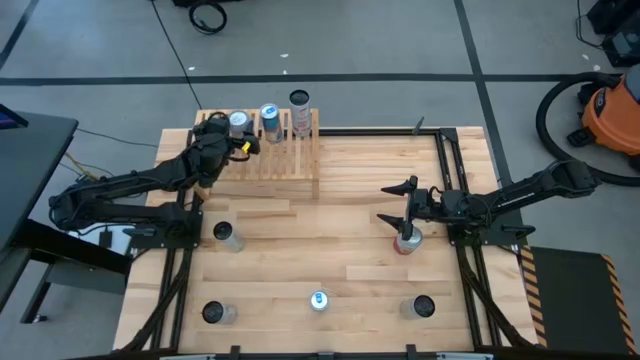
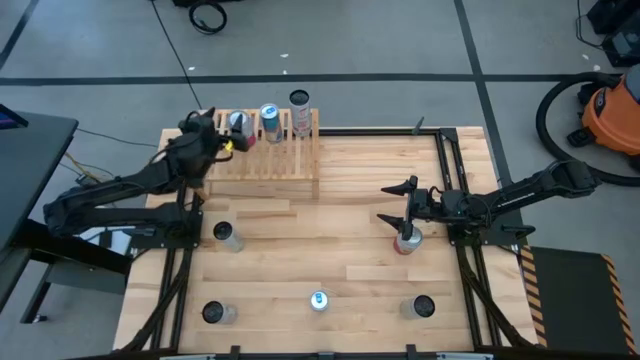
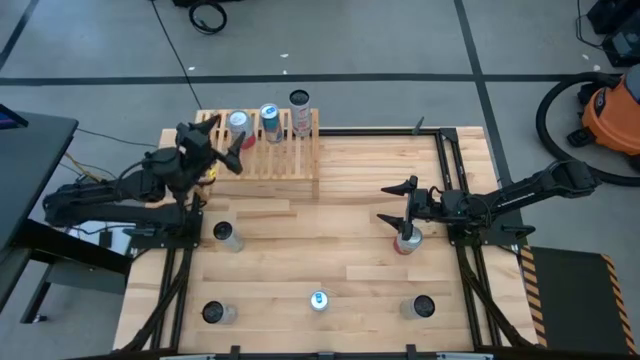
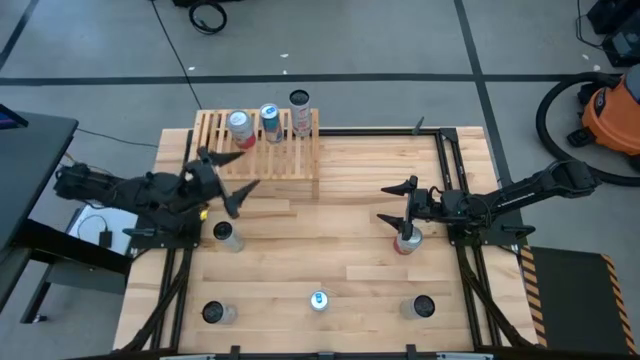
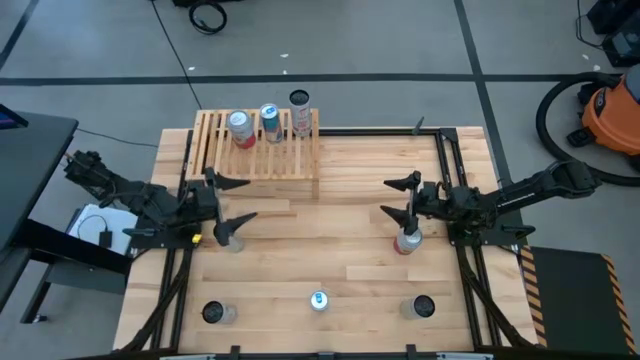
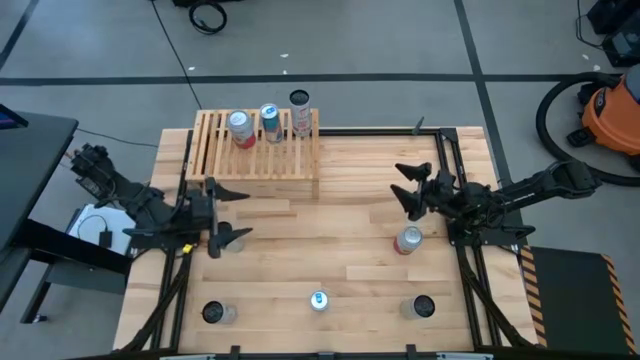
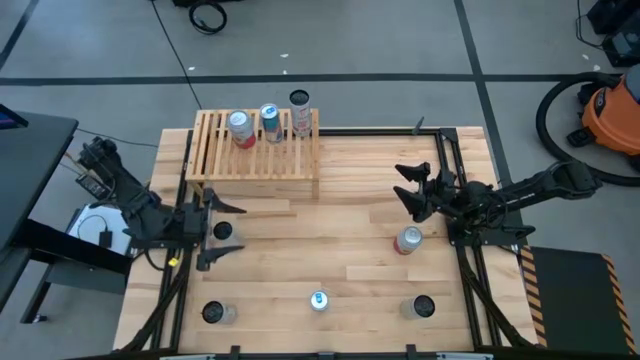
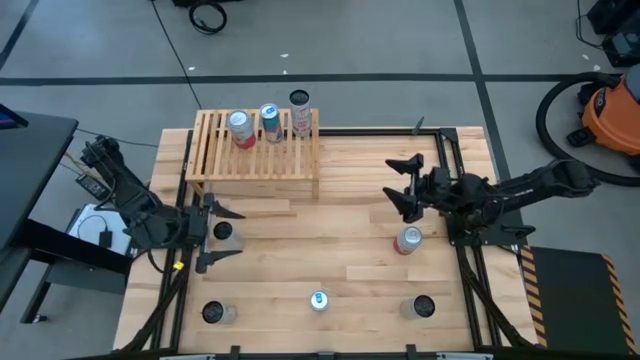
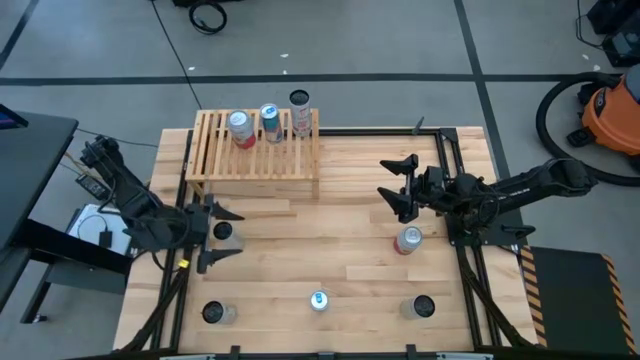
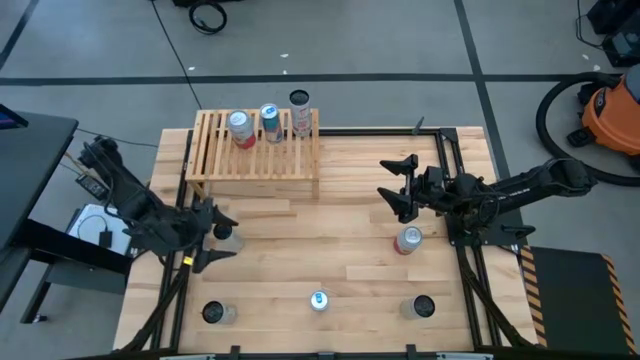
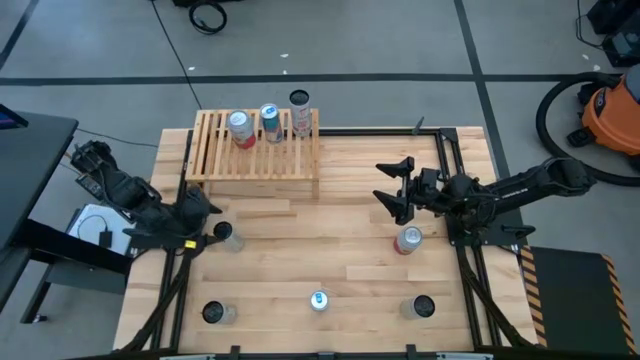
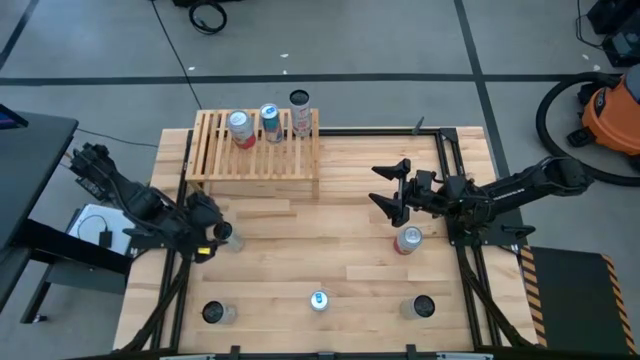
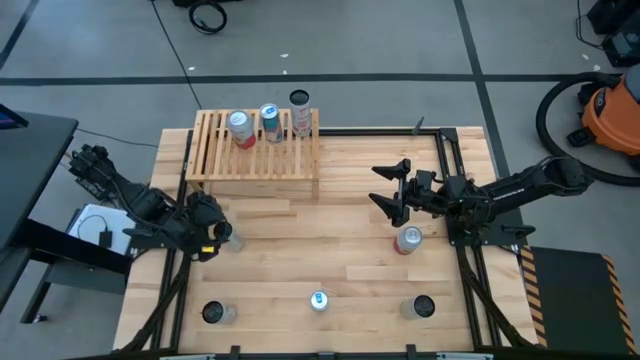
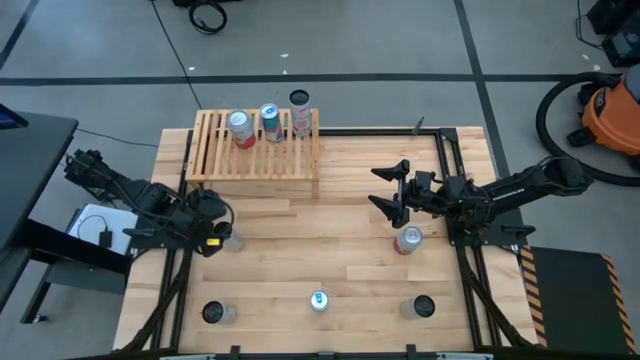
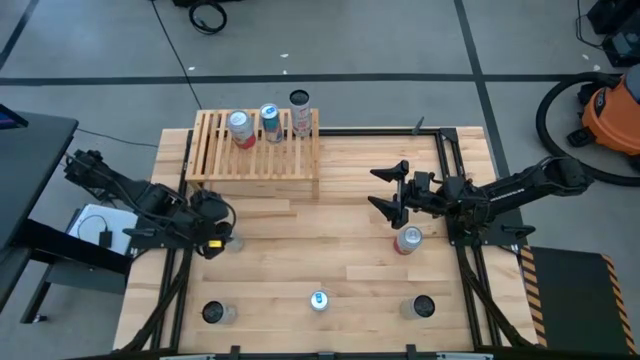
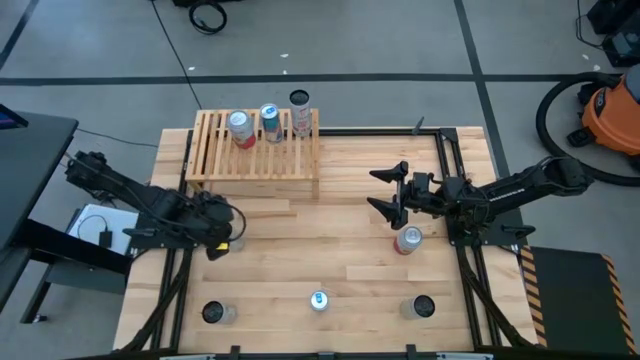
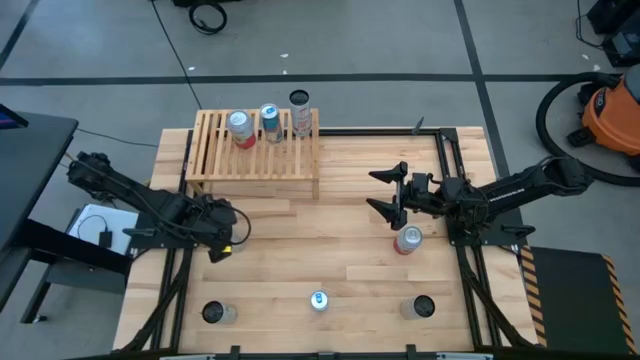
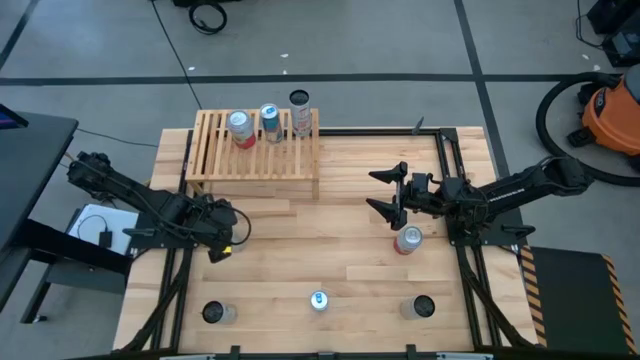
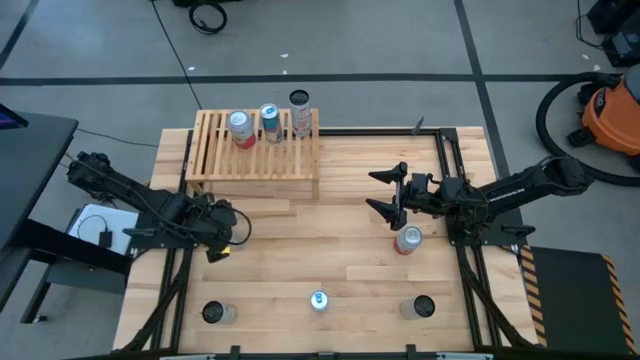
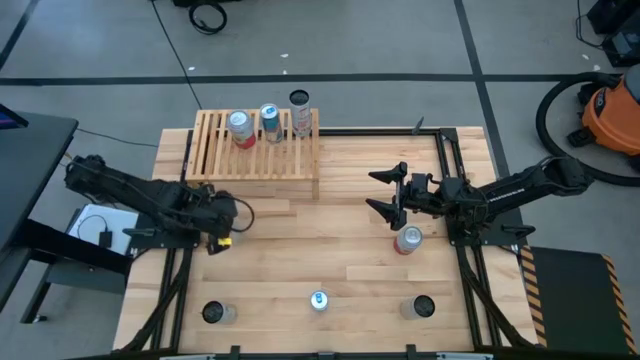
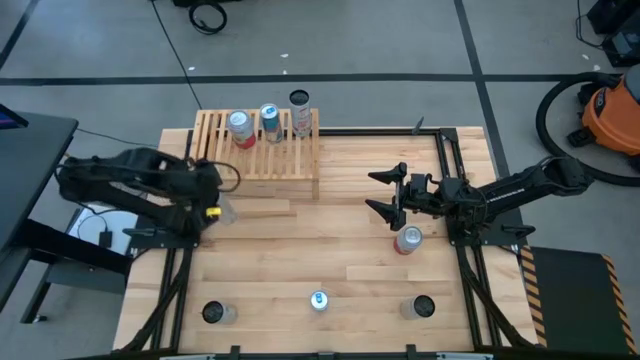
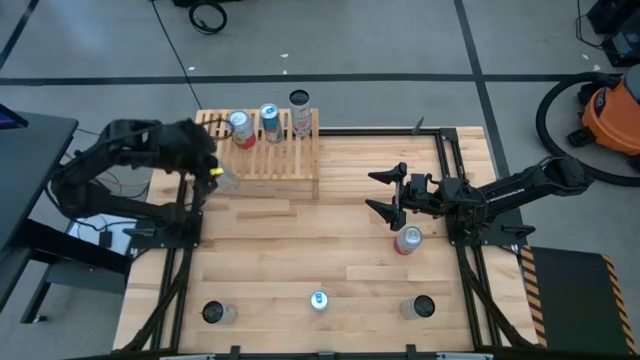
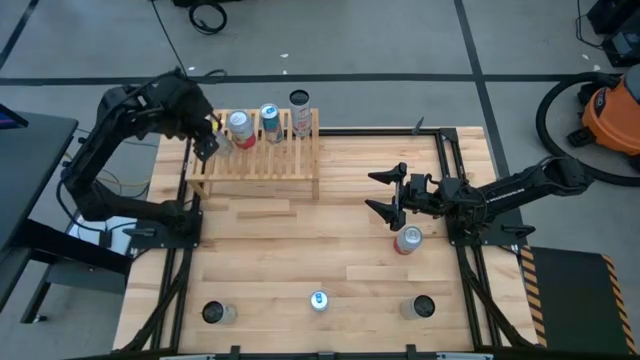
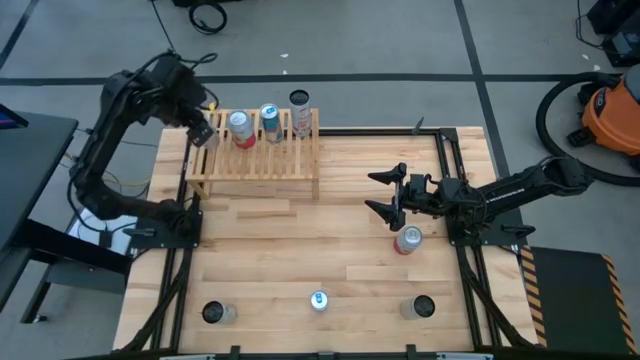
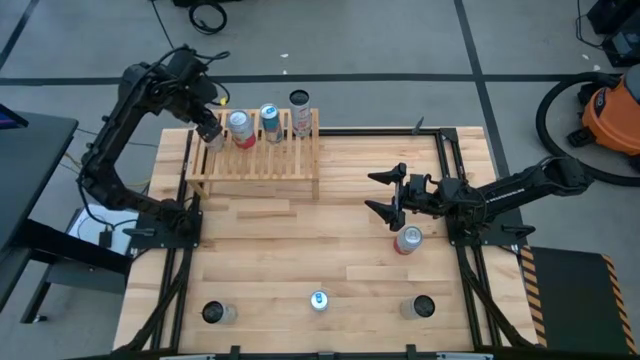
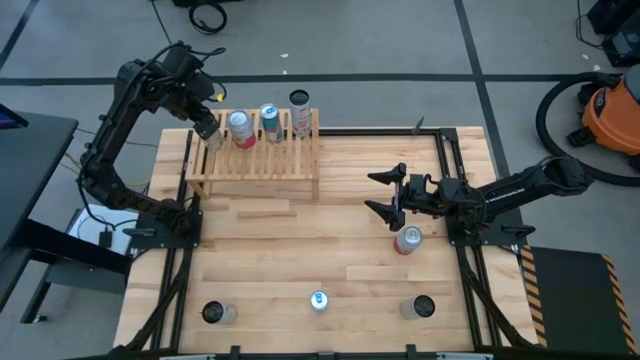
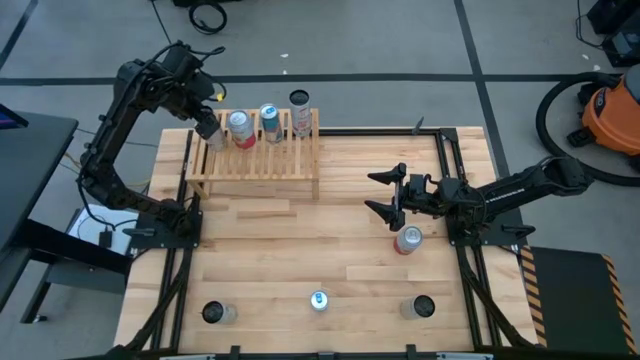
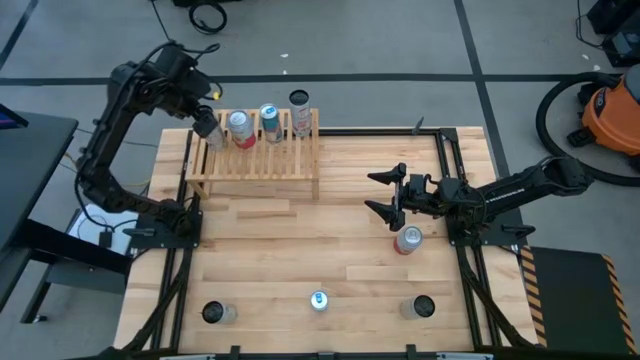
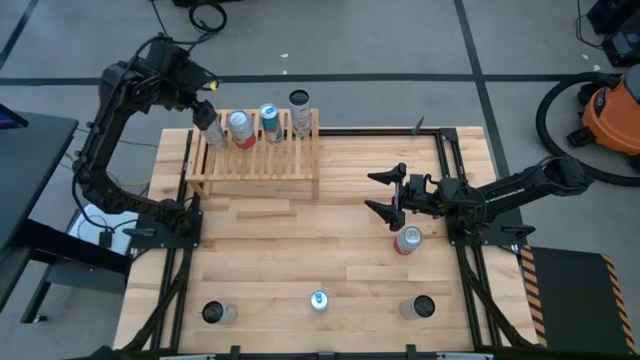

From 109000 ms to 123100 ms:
Task: Place canned beverage on shelf
Put the top white yellow soda can on the shelf

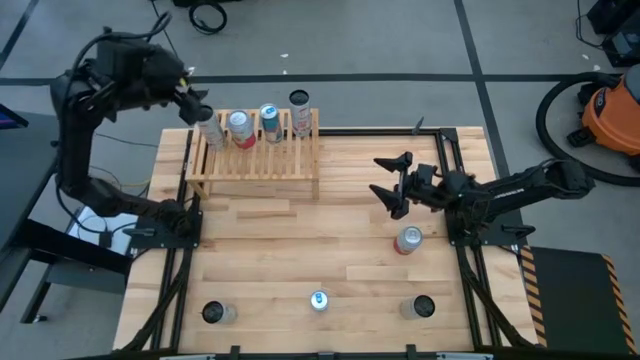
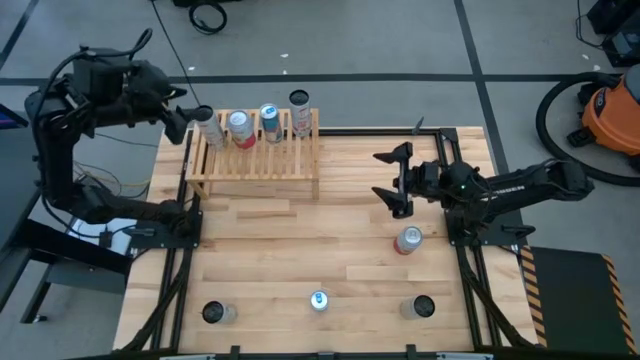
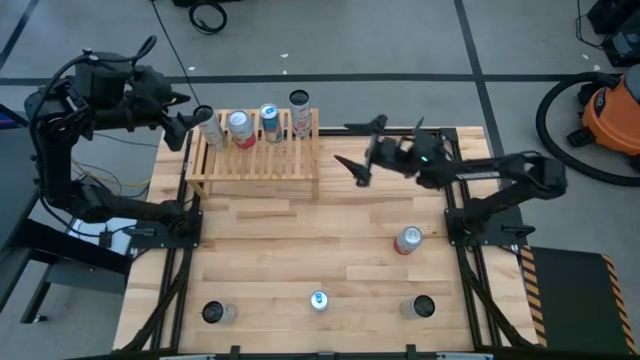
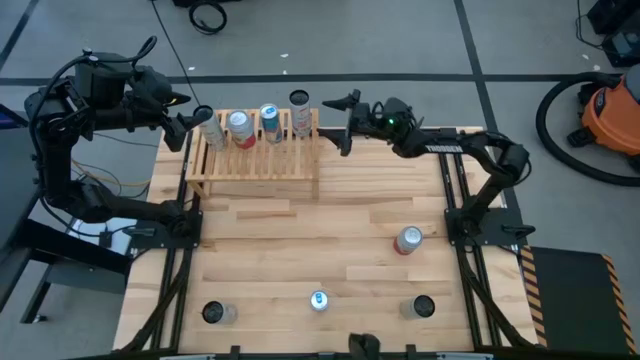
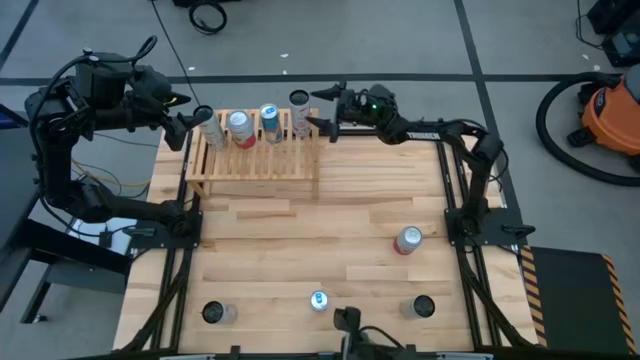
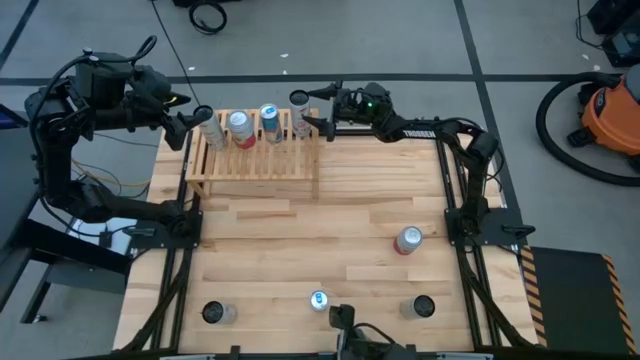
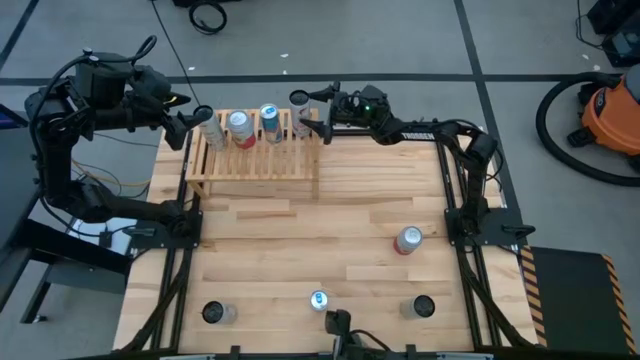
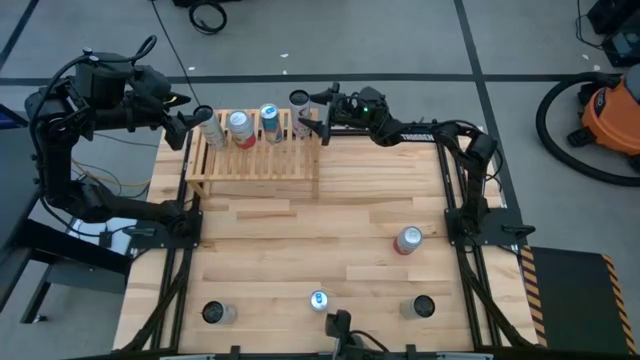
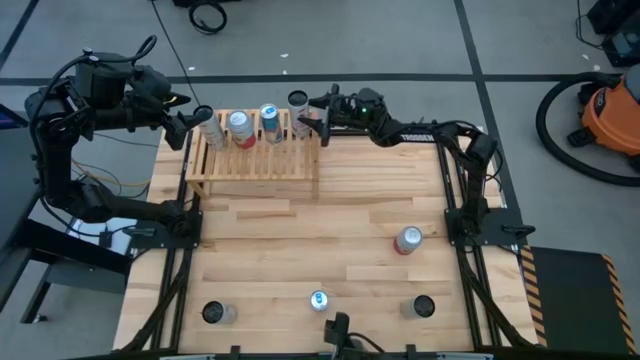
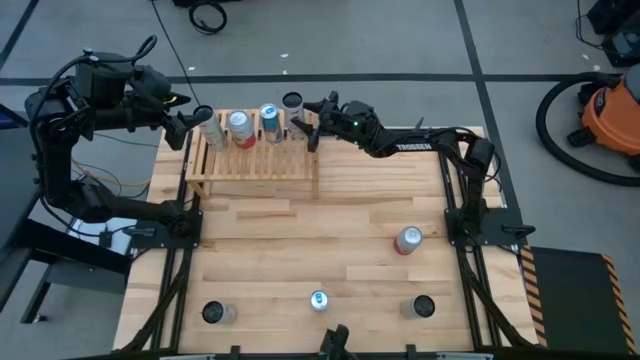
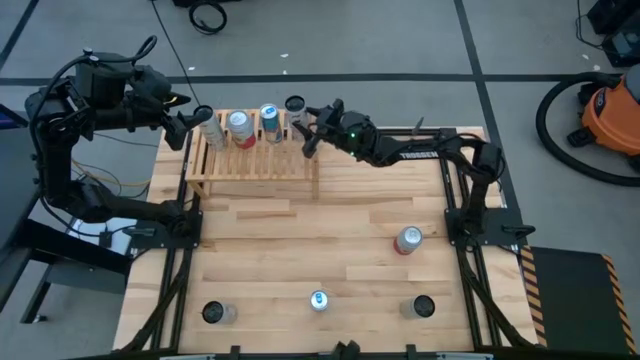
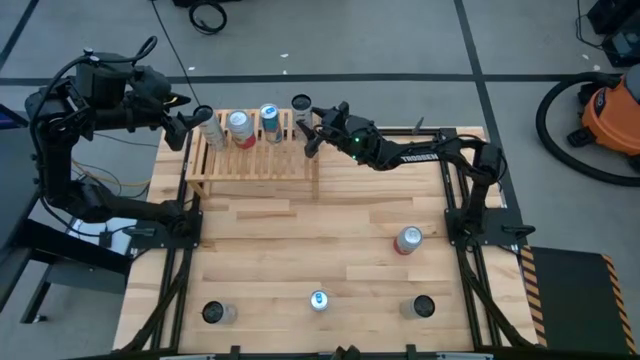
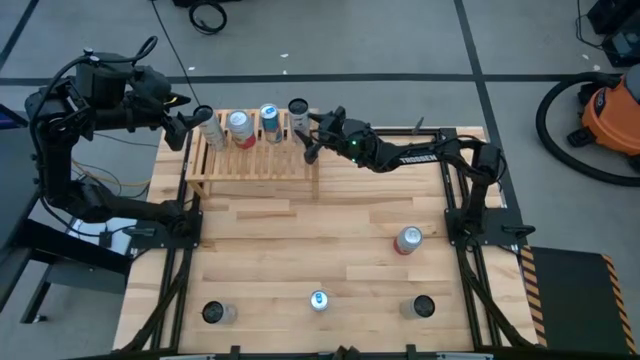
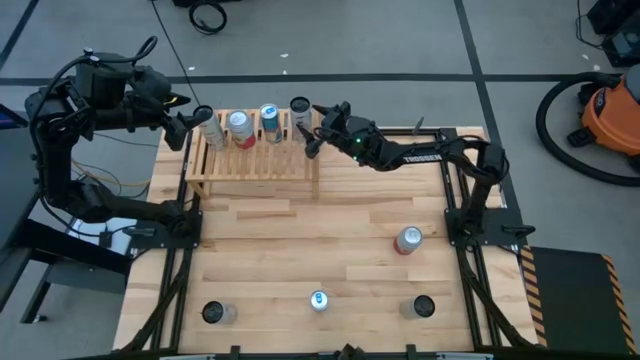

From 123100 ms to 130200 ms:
Adjust the white pink soda can on the shelf

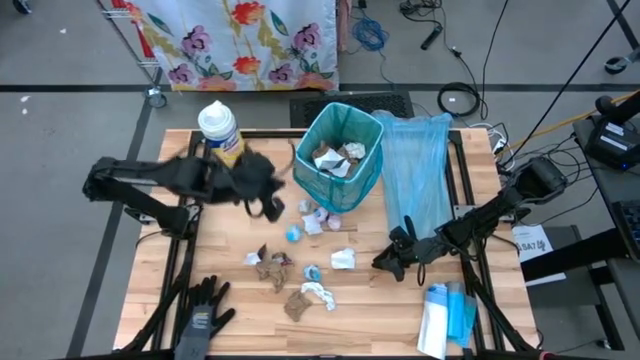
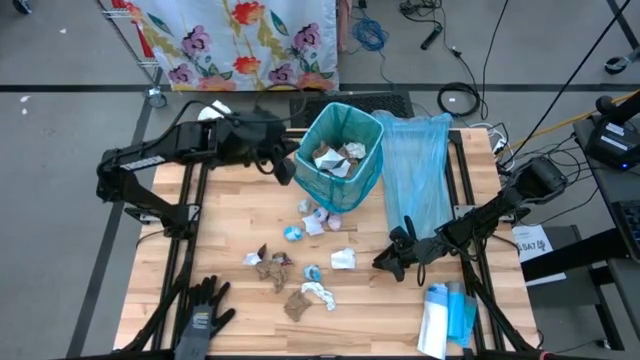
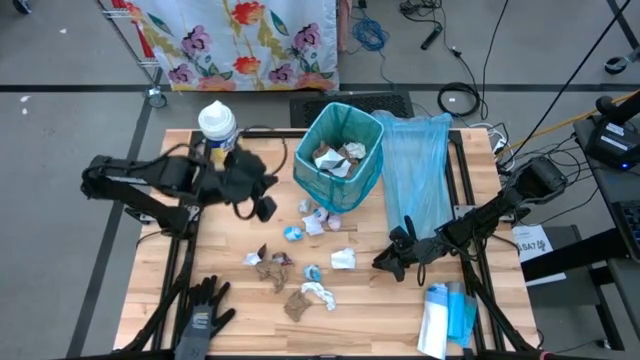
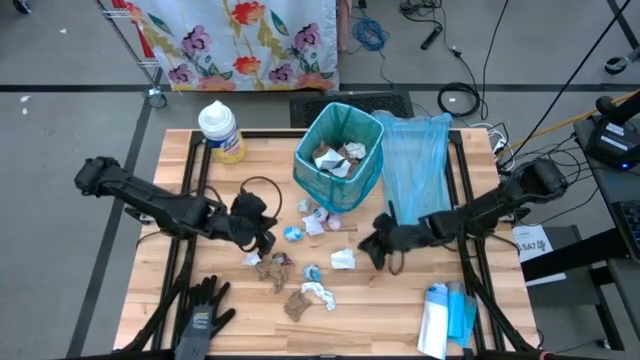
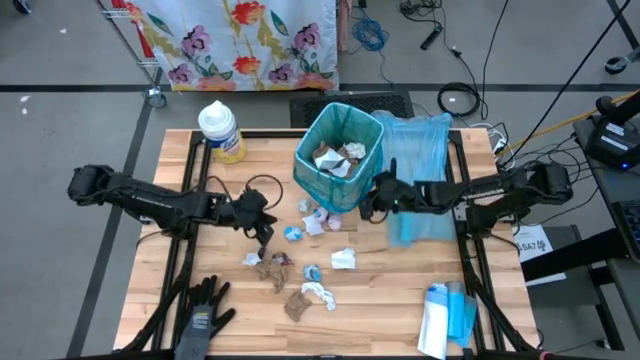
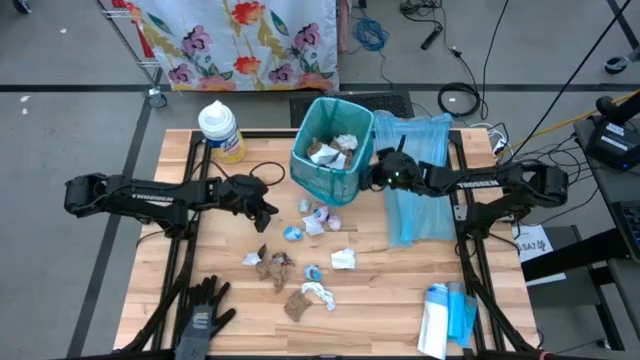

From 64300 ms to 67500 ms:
Task: place trash/remove bag and relplace
Adjust the trash bin
